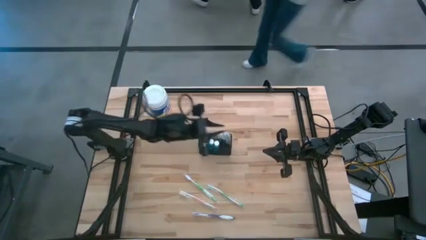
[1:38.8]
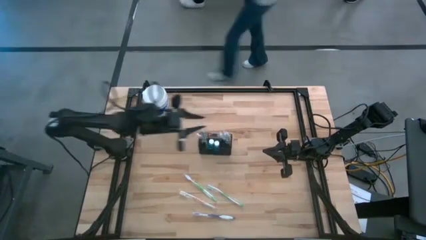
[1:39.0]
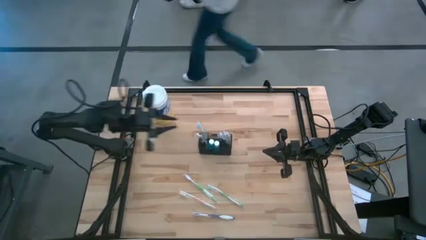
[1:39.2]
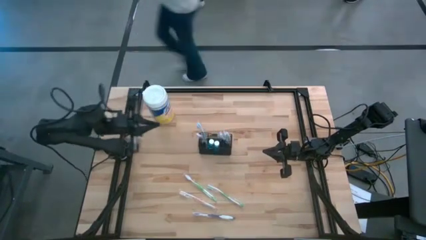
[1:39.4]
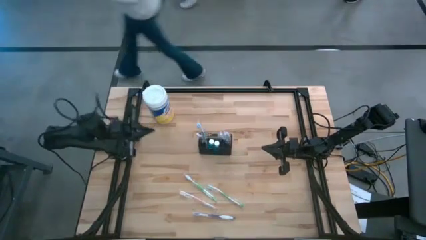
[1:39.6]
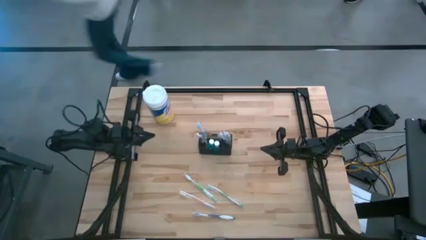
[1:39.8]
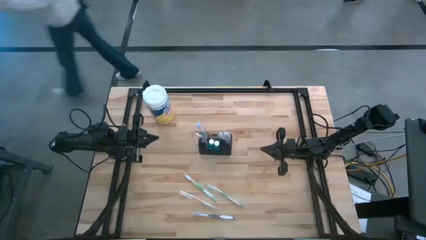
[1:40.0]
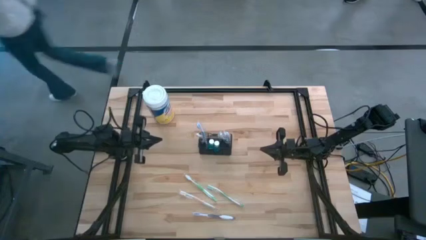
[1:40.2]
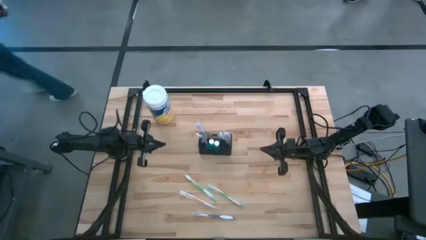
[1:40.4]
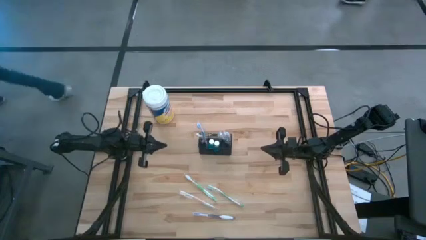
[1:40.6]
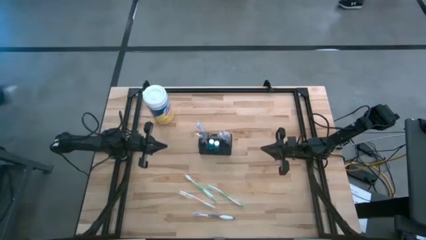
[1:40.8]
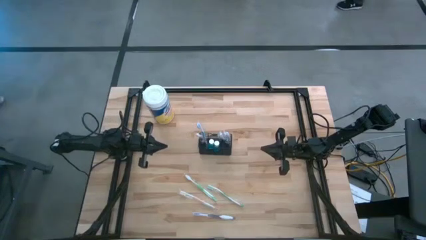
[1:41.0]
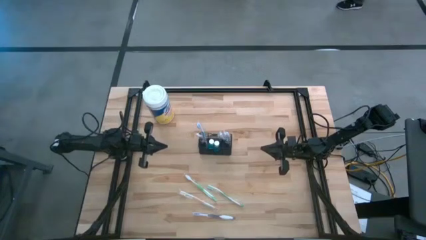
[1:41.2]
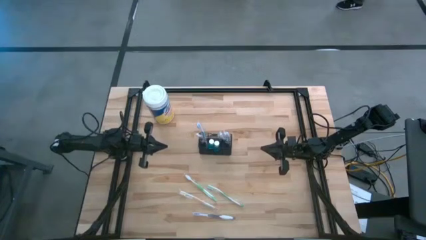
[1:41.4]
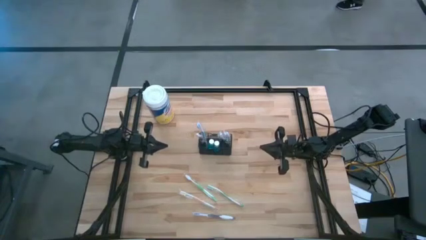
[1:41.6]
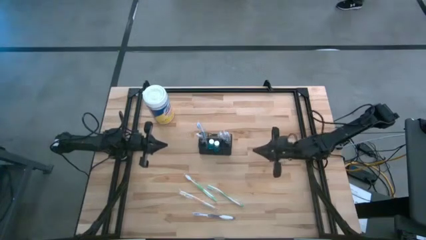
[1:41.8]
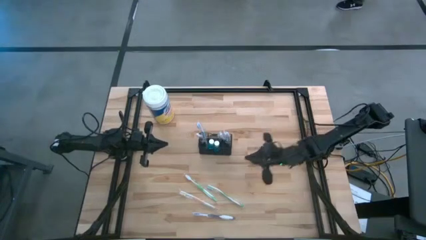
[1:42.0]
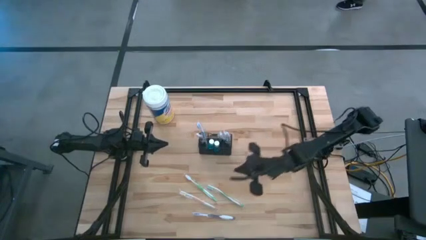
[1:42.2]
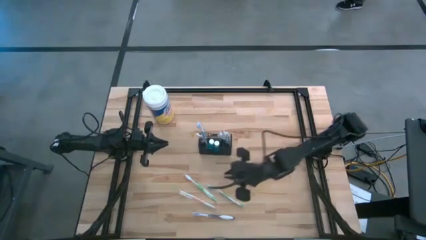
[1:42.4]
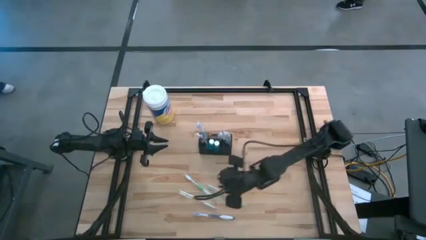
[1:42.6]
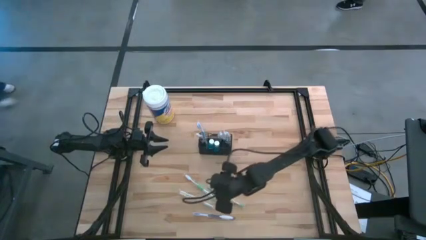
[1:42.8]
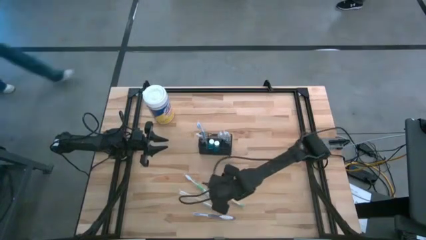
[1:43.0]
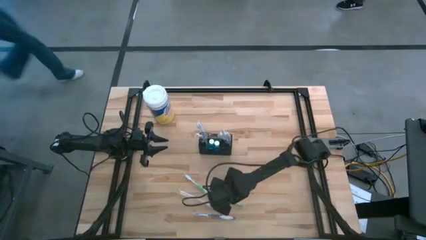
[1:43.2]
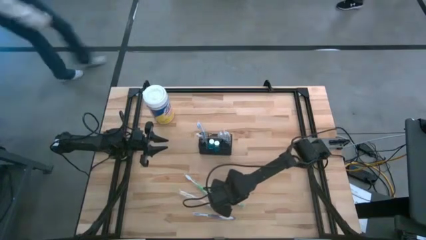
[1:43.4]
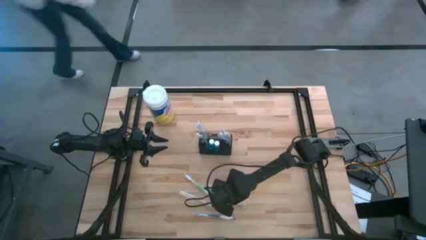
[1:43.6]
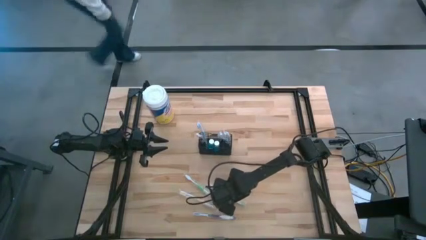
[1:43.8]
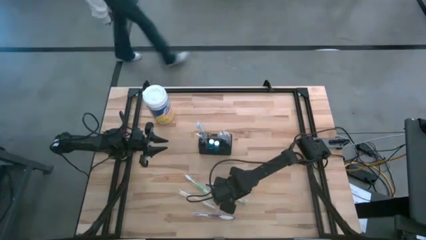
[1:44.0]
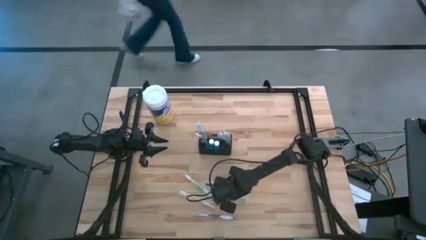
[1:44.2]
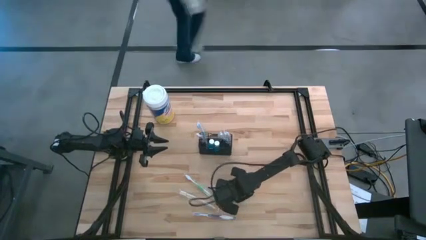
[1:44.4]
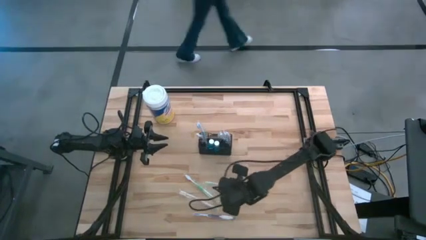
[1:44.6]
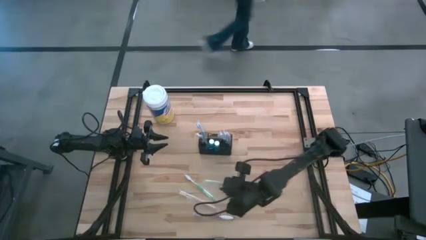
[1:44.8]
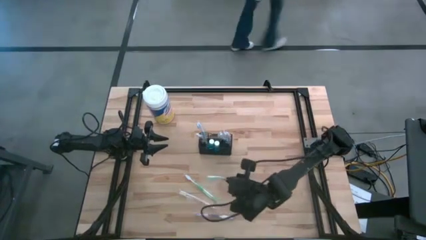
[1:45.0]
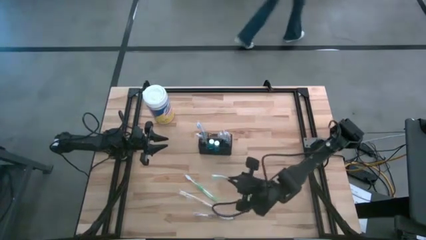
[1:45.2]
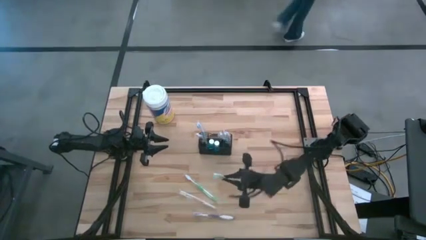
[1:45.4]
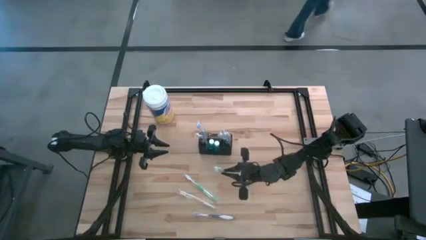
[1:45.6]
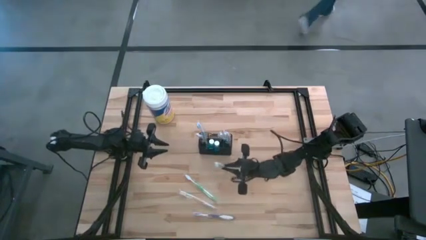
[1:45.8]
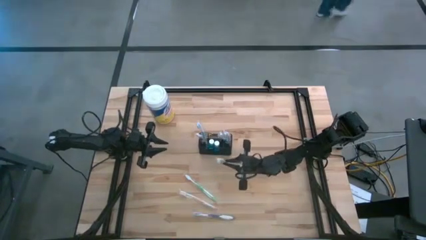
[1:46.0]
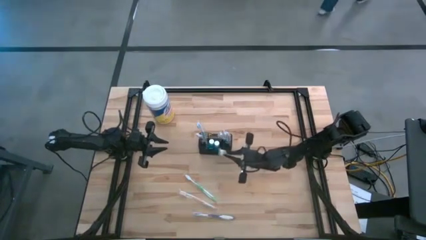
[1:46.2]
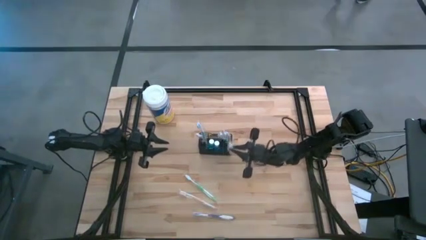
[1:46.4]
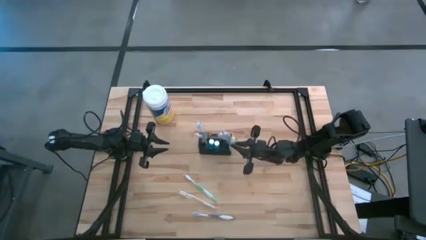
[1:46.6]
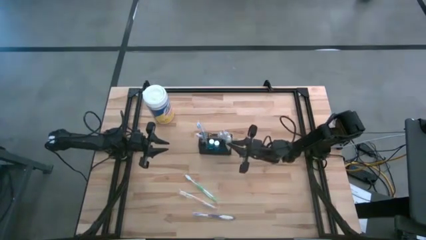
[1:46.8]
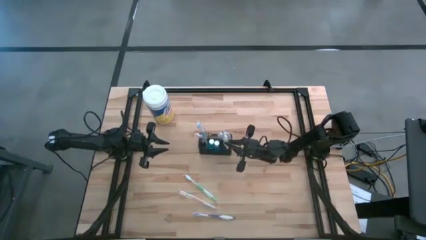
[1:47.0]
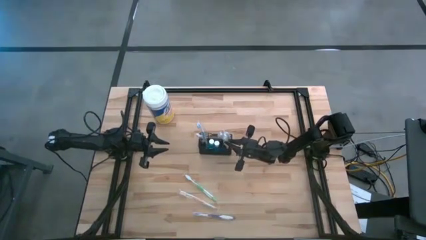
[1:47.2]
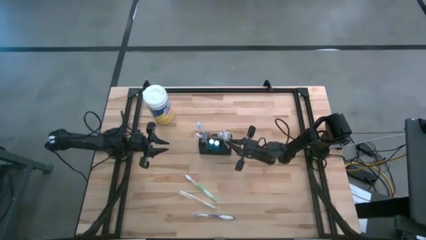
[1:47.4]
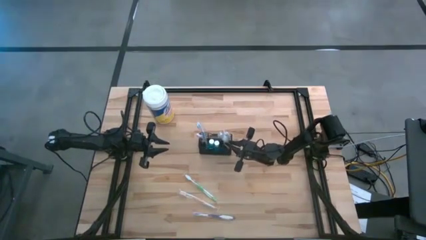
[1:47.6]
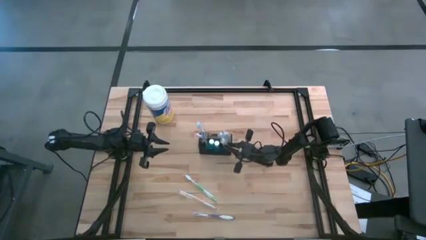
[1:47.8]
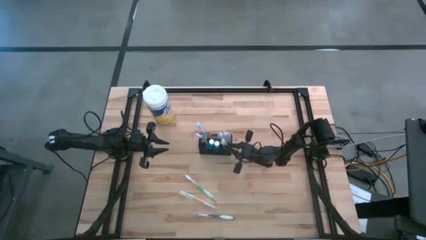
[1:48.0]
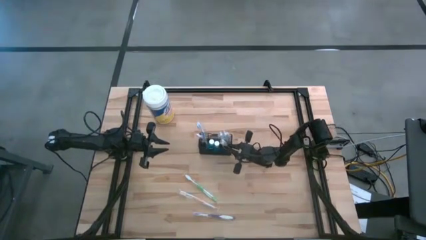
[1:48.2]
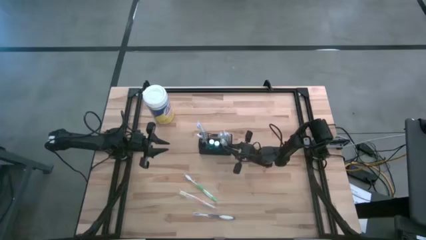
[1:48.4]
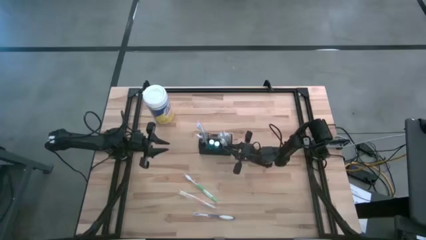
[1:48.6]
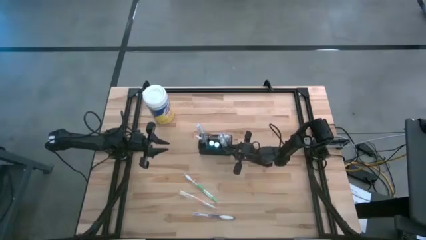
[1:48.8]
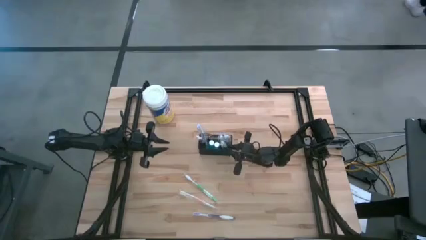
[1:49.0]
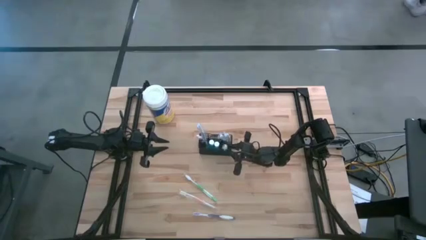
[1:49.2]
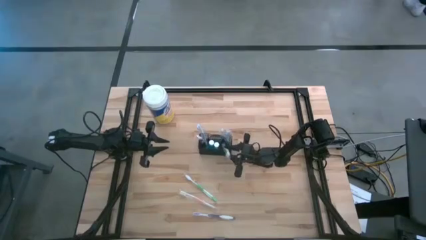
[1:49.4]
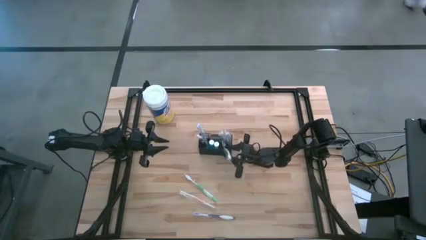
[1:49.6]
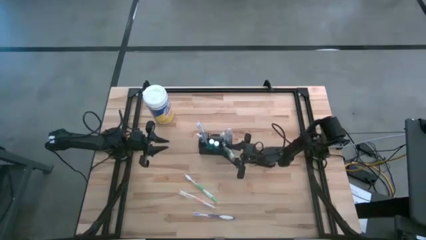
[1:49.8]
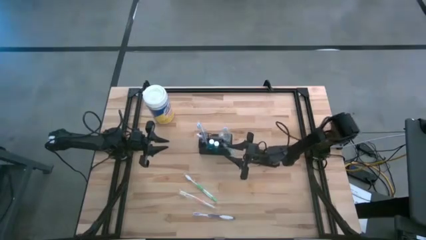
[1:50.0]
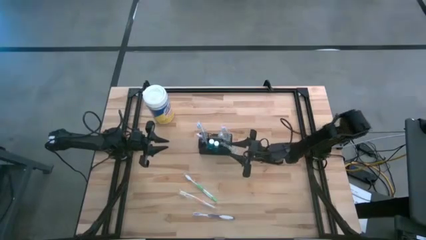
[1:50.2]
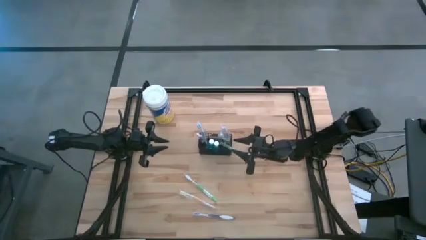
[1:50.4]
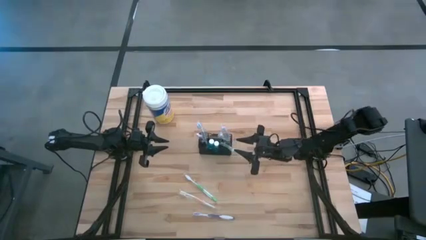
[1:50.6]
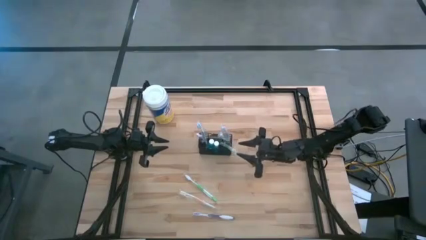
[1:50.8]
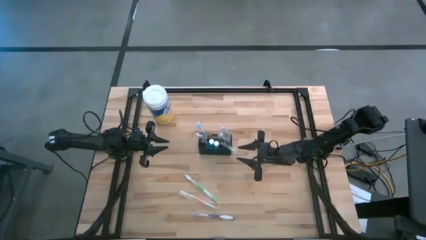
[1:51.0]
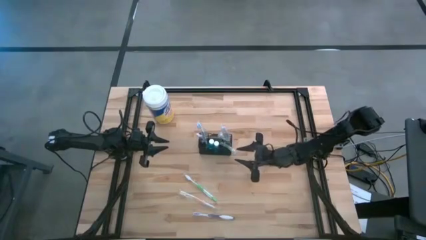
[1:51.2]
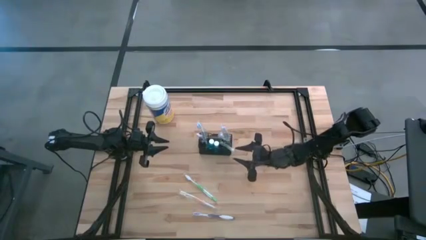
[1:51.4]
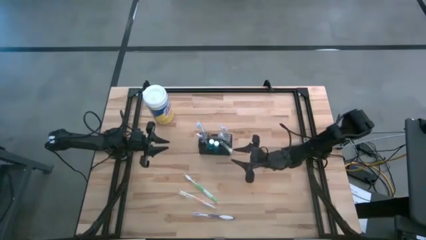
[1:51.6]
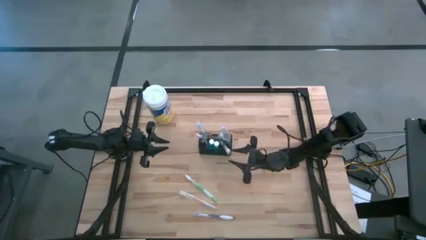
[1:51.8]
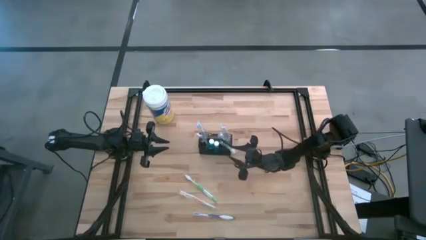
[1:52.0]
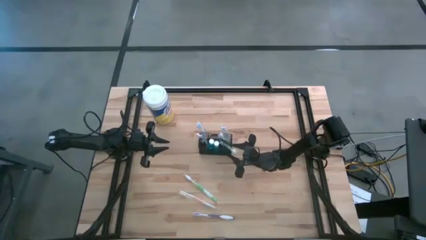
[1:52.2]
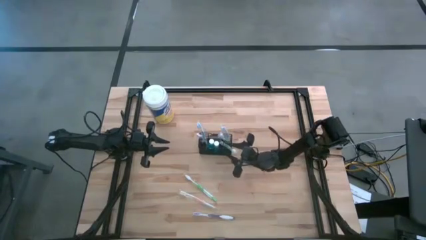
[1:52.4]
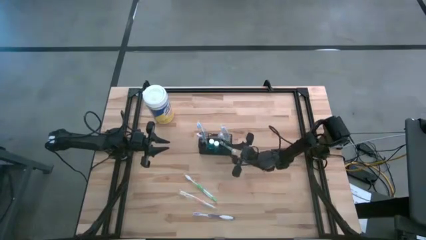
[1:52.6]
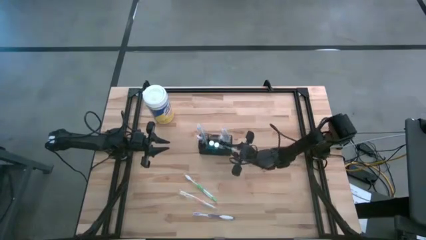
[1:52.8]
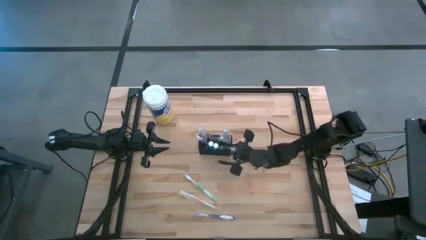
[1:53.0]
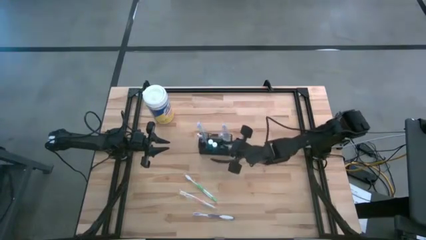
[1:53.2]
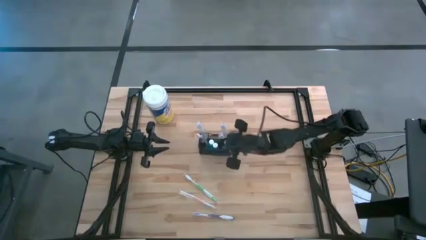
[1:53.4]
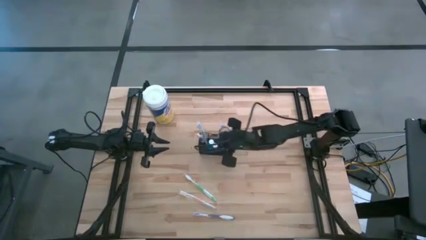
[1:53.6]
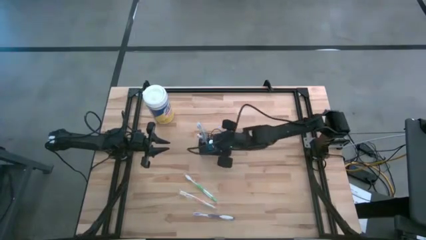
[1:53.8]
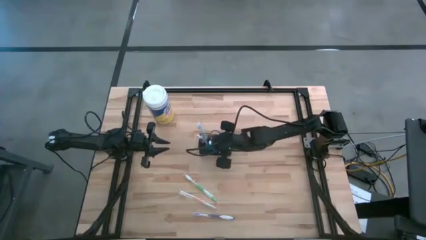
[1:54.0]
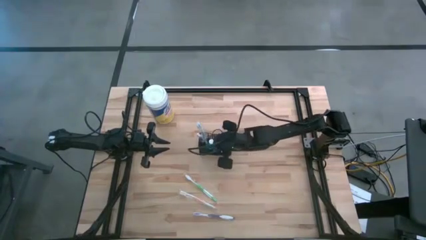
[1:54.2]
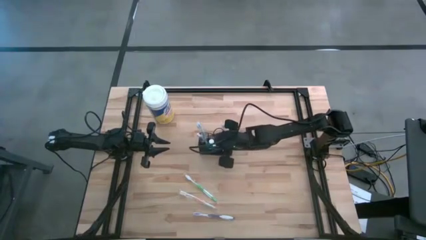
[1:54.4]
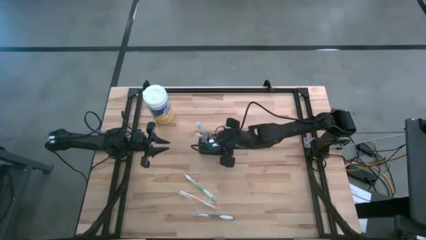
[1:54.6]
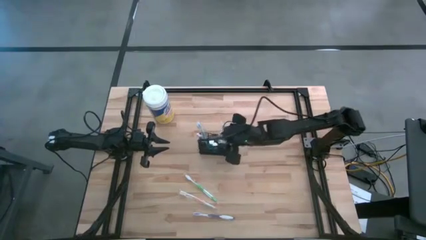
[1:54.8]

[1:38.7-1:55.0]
Task: Pick & Place toothbrushing station
Put the right green toothbrush into the mesh organizer
